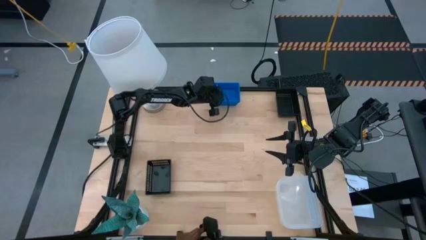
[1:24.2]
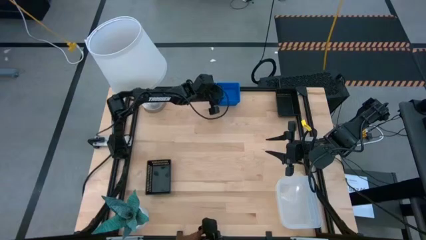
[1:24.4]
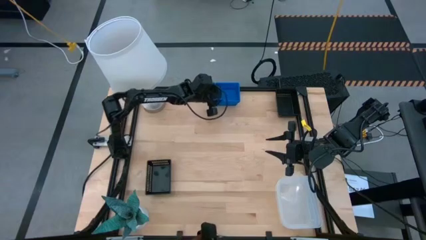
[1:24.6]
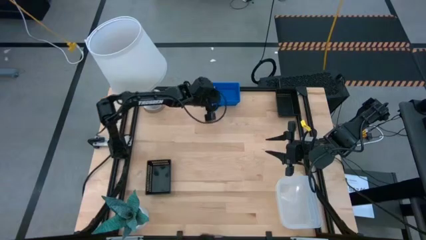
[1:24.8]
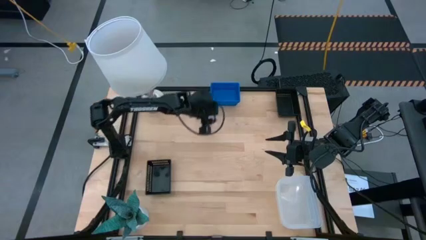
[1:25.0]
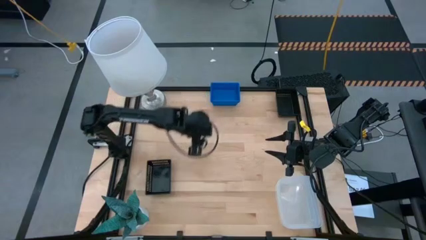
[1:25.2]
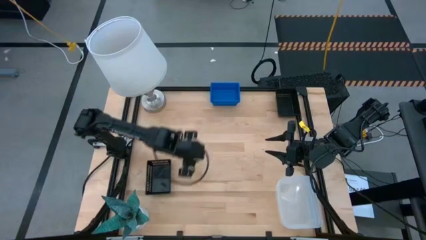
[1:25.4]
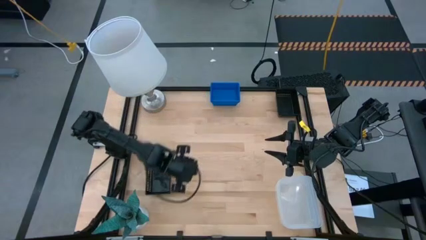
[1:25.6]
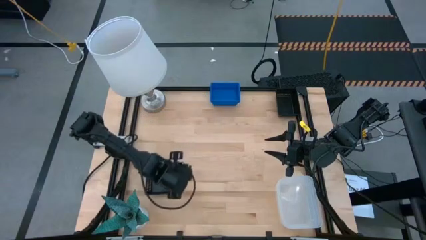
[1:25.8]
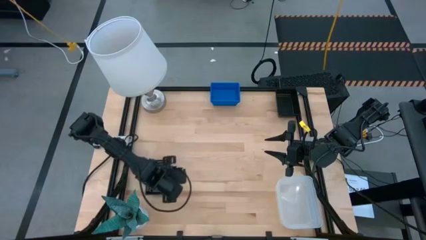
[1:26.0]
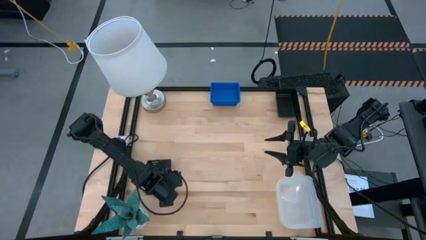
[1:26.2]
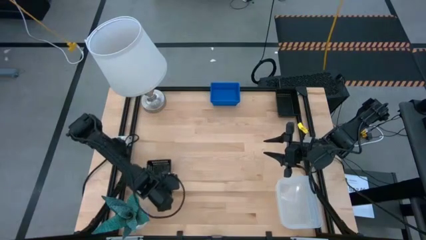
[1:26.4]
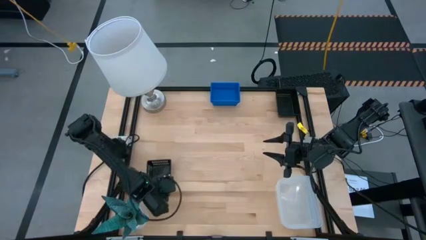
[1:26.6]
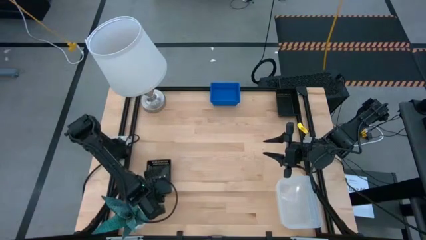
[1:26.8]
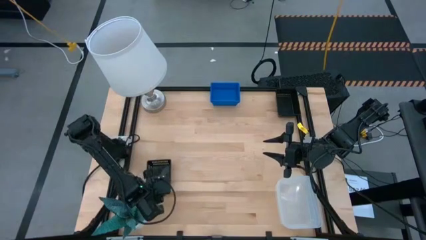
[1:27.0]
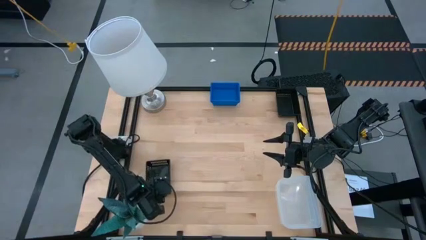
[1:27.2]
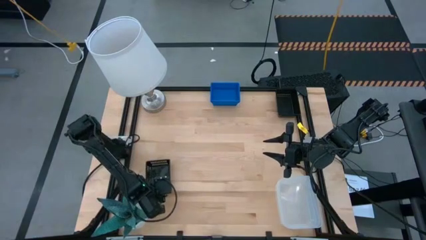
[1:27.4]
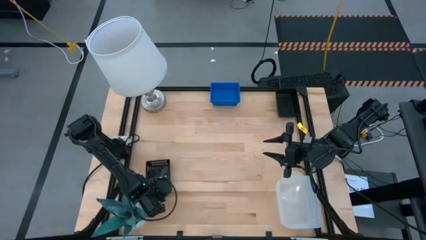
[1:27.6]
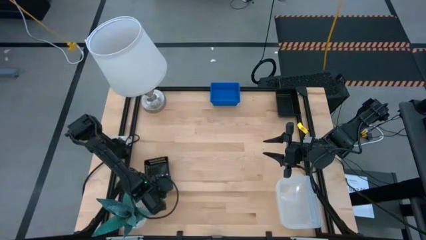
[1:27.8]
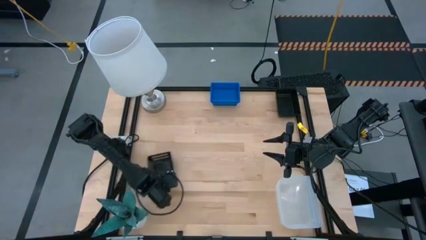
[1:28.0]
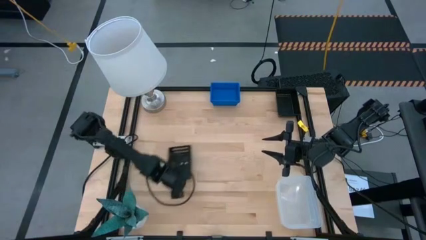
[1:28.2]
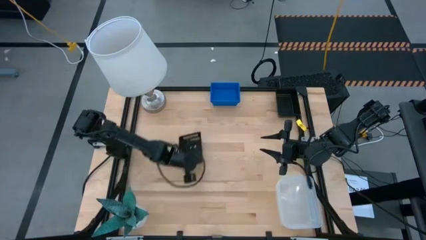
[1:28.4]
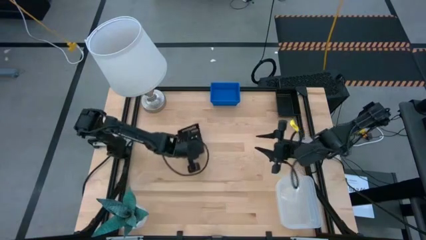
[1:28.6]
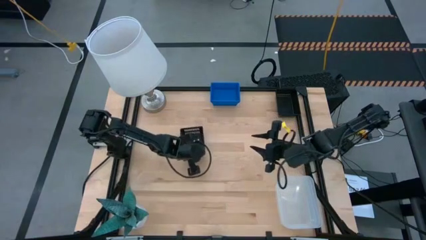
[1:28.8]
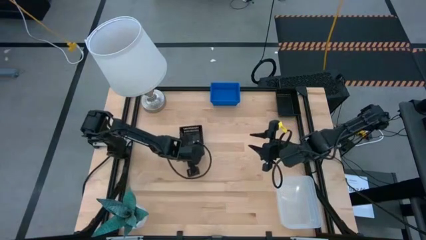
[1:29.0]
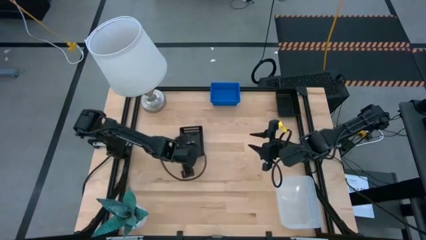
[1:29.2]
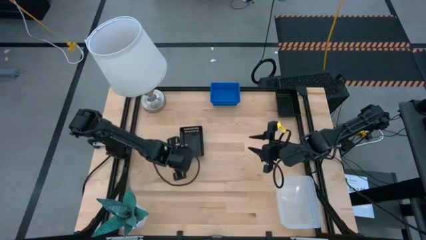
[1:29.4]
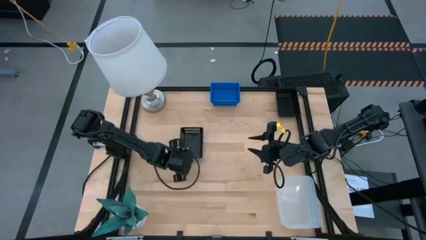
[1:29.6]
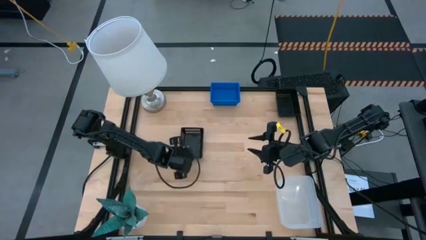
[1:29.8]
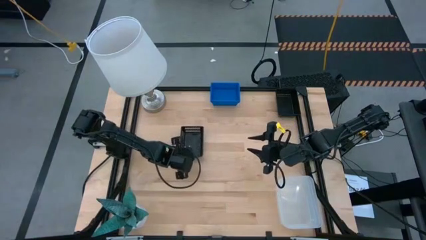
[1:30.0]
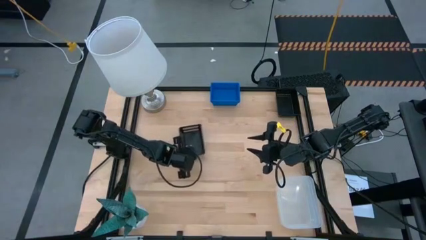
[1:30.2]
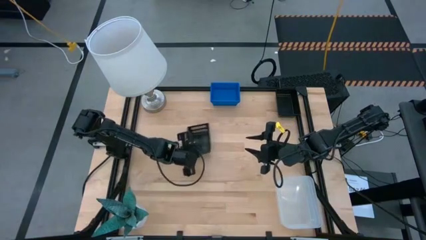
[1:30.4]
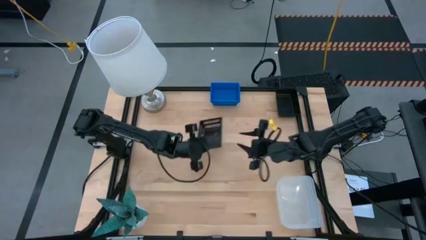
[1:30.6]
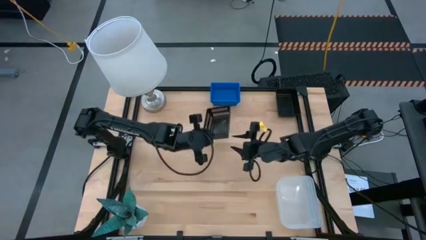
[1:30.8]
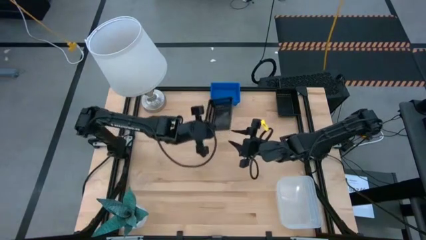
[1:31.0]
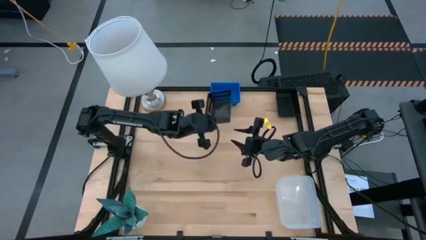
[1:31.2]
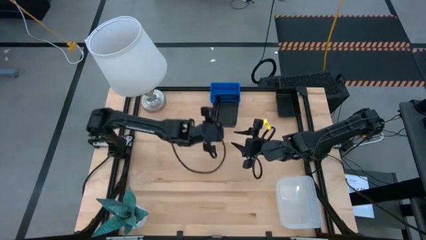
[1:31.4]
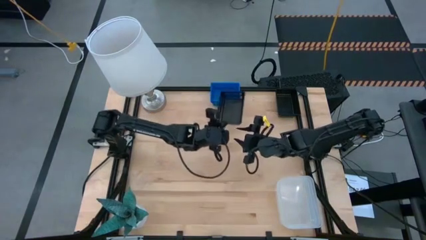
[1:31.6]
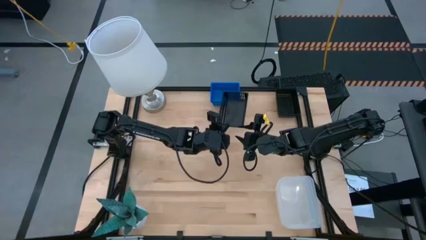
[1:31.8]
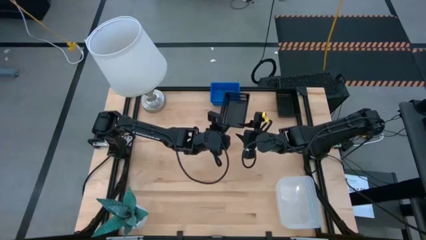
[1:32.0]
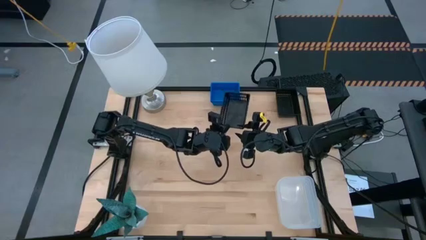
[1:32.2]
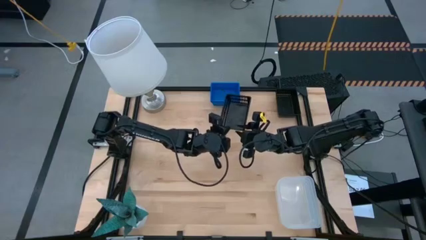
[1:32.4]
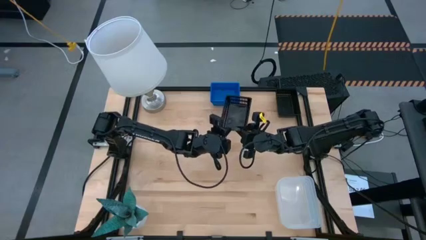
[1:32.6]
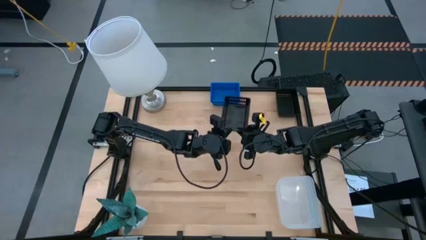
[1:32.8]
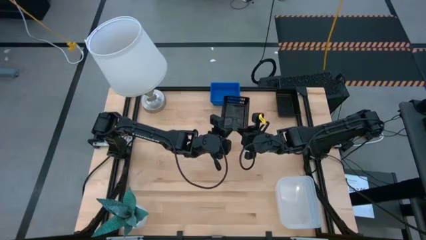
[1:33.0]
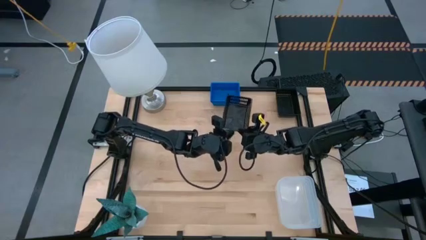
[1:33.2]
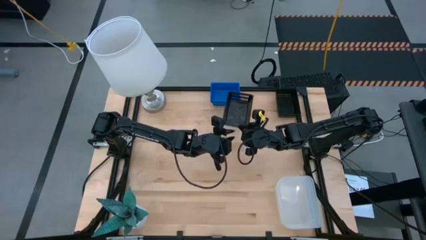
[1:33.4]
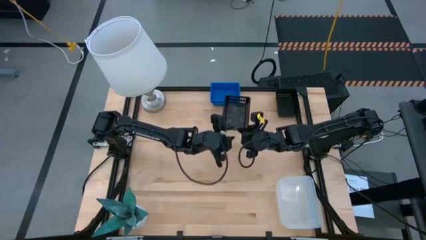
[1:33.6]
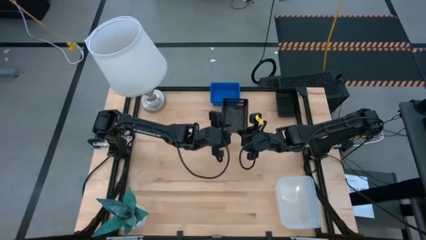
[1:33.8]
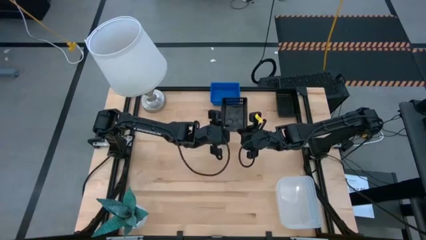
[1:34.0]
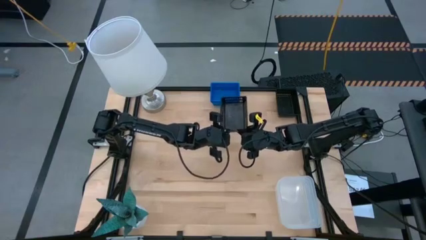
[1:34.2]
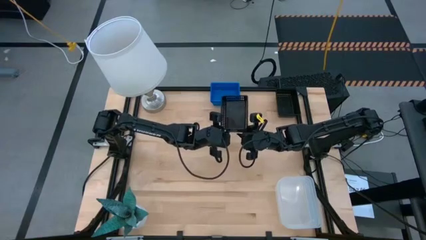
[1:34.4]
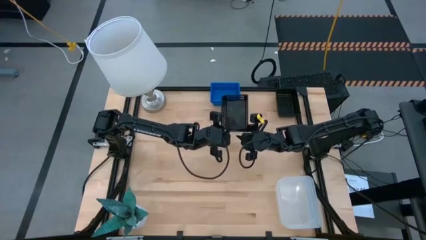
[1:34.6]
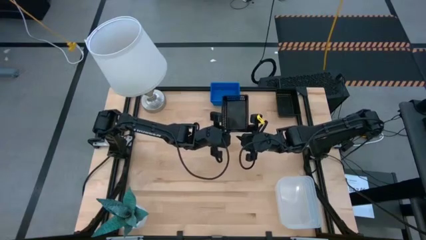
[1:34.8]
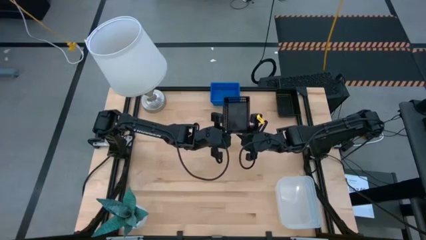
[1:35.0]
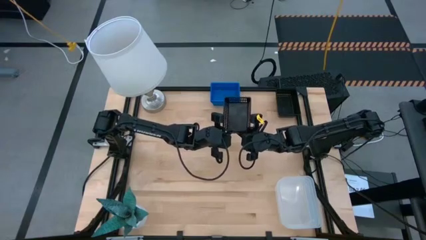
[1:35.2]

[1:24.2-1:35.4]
Stack the bottom black bin on top of the top black bin
